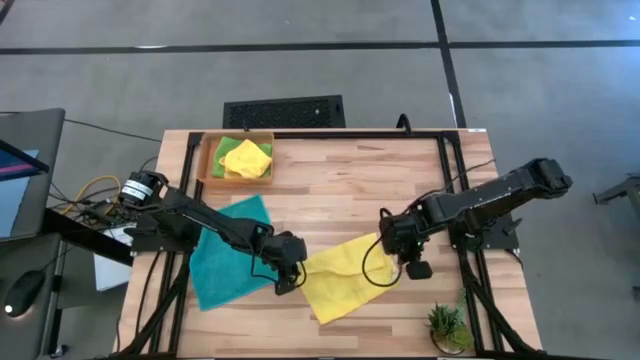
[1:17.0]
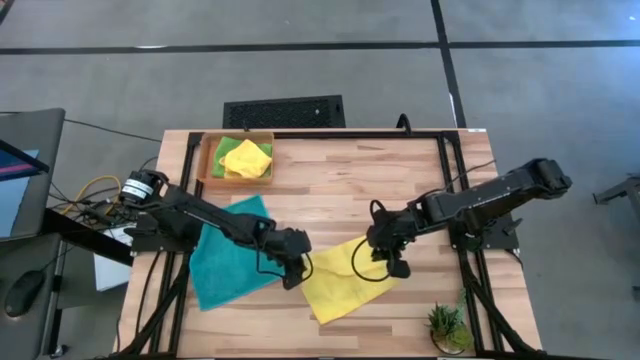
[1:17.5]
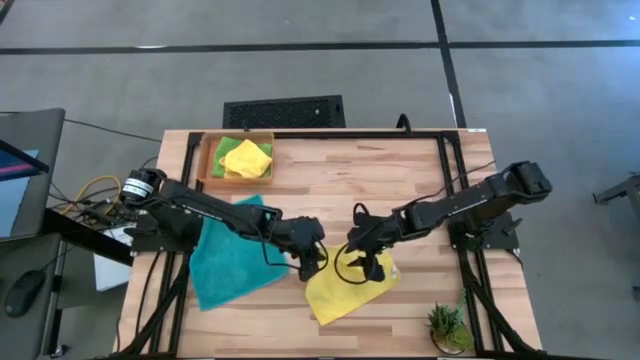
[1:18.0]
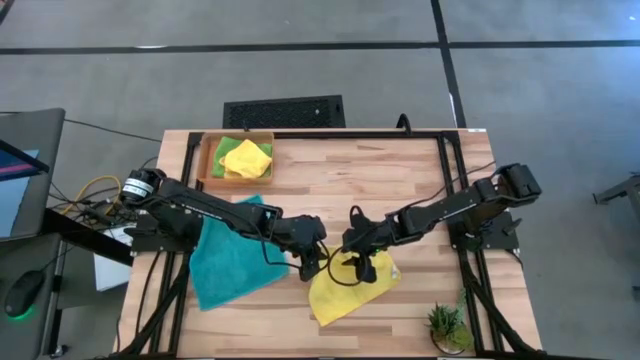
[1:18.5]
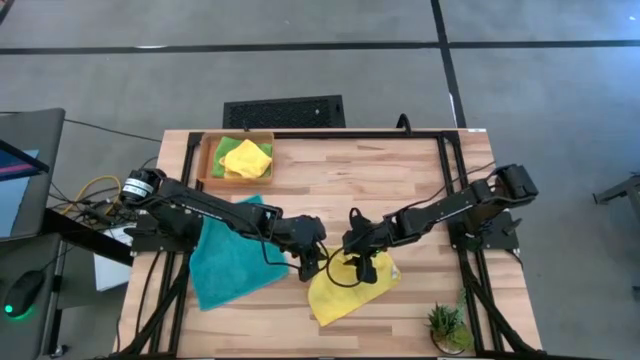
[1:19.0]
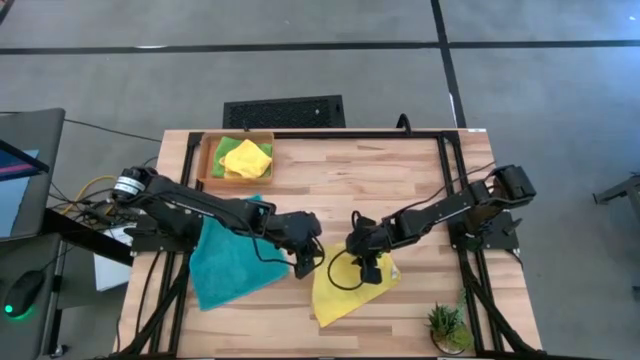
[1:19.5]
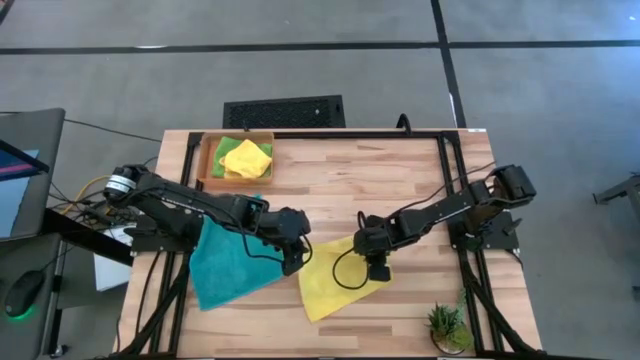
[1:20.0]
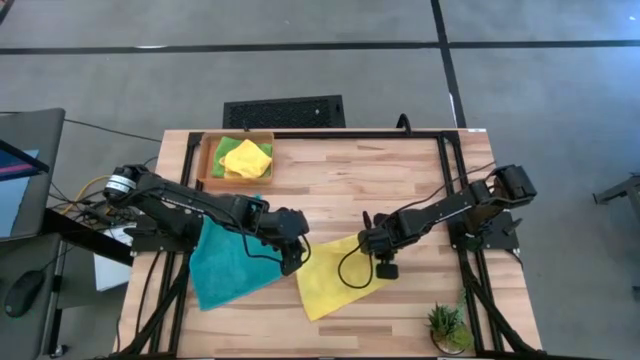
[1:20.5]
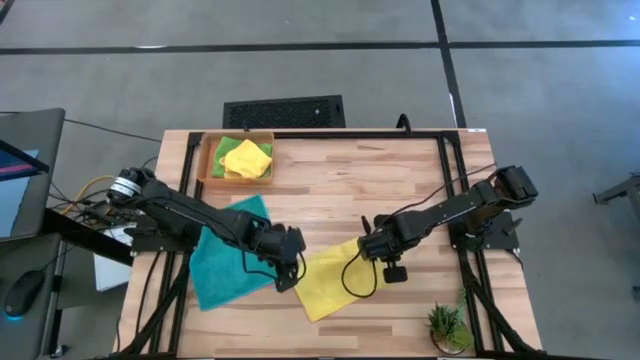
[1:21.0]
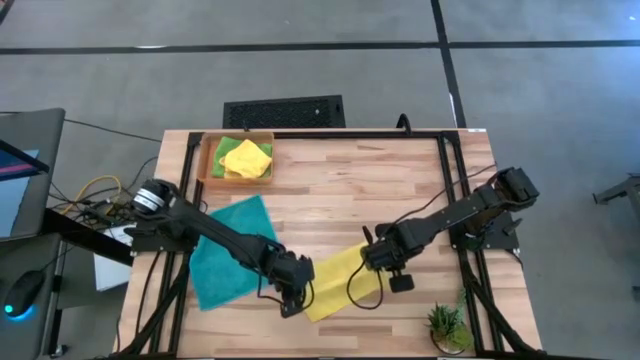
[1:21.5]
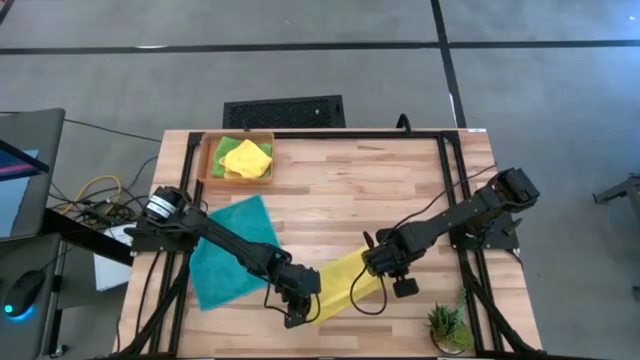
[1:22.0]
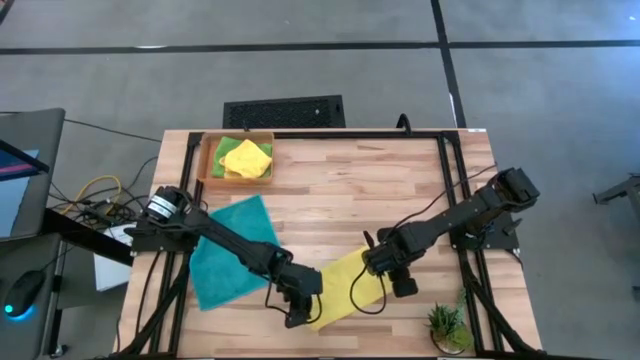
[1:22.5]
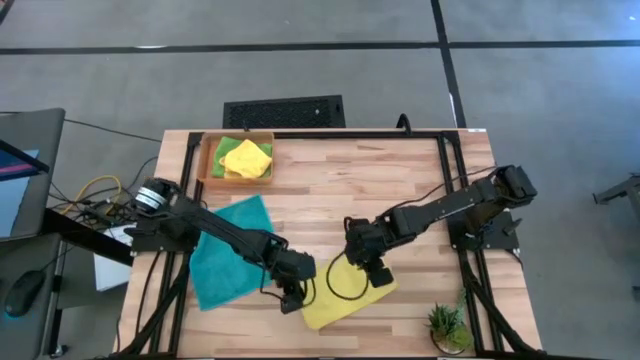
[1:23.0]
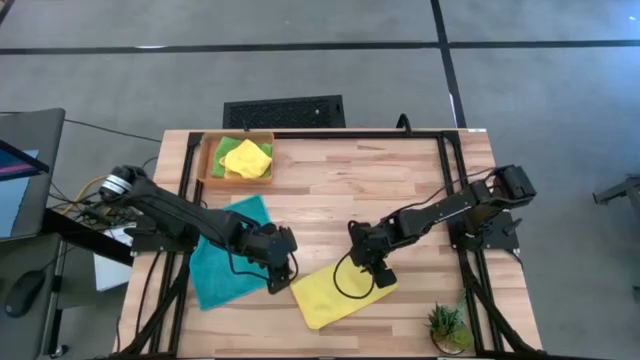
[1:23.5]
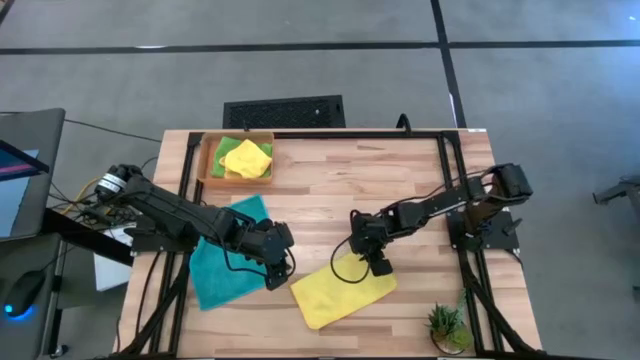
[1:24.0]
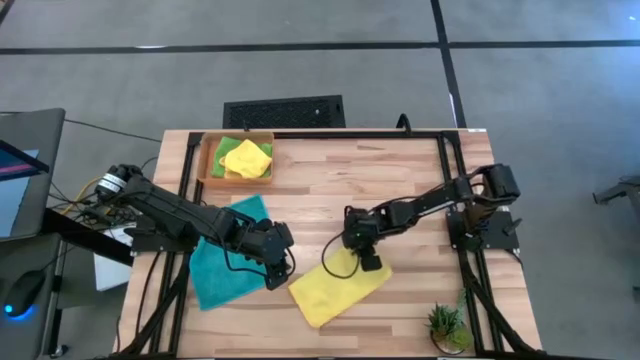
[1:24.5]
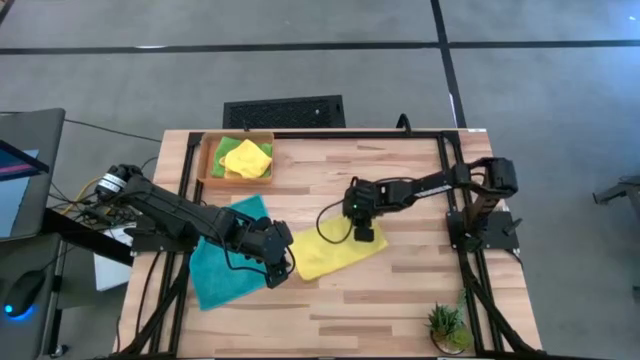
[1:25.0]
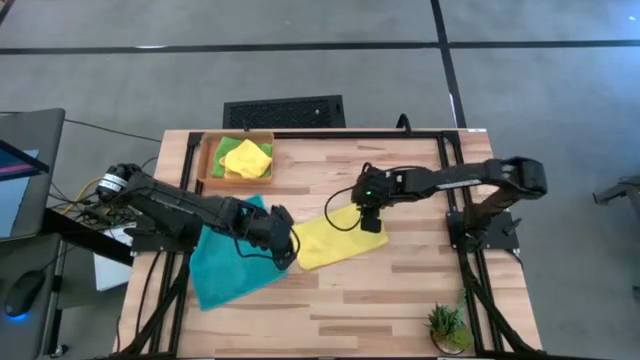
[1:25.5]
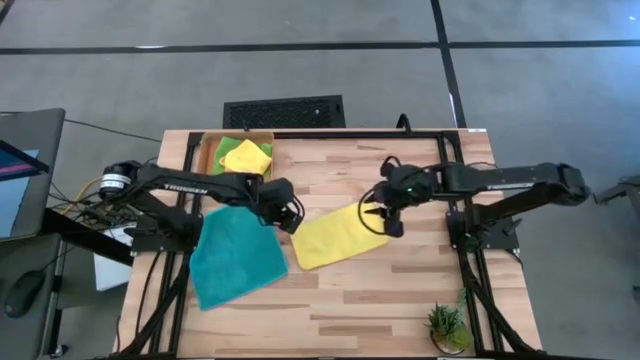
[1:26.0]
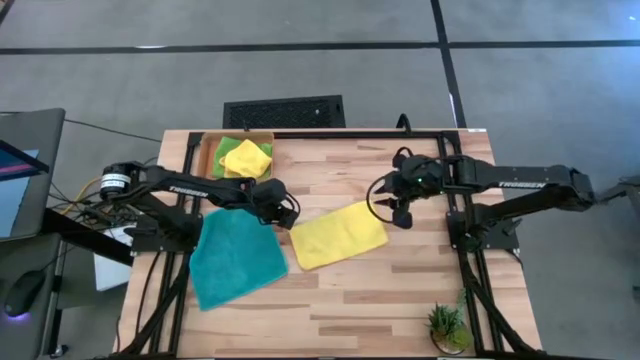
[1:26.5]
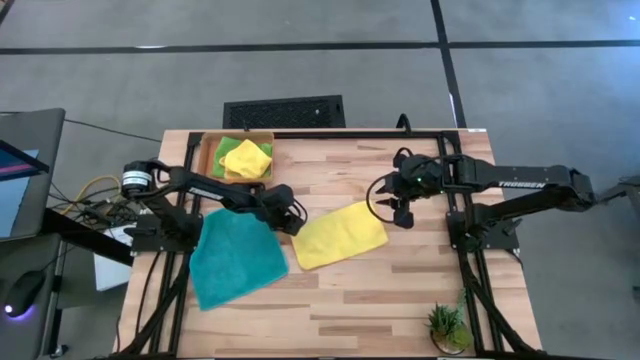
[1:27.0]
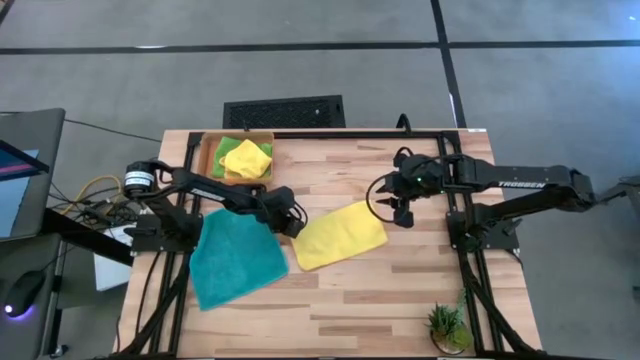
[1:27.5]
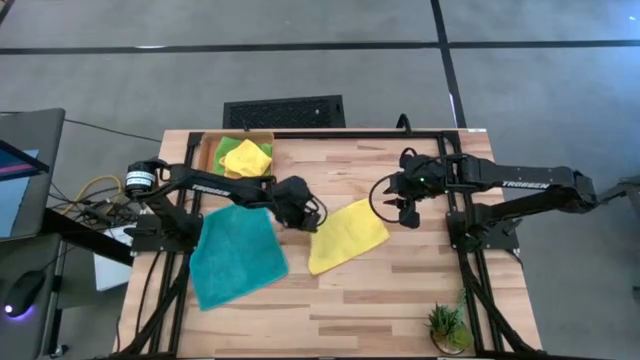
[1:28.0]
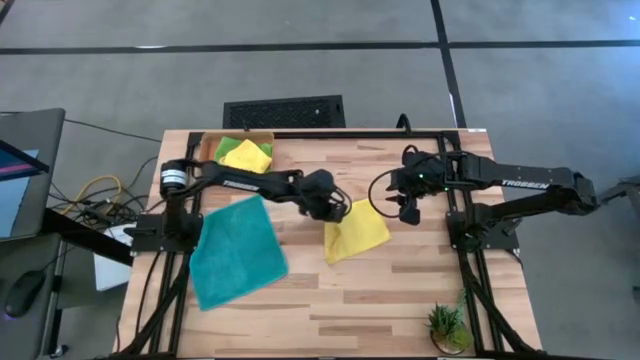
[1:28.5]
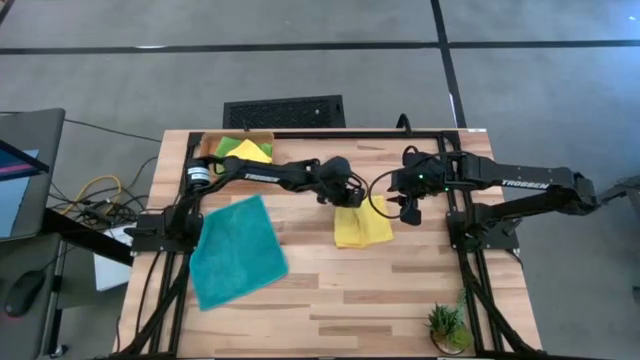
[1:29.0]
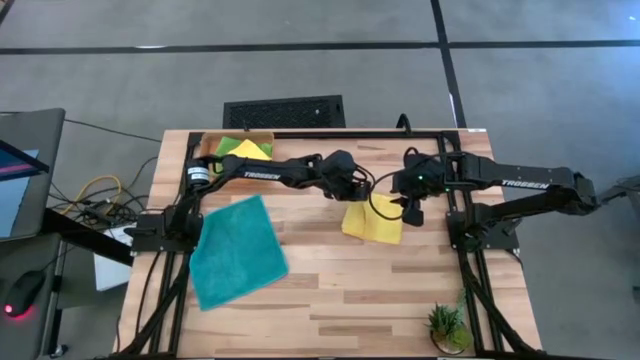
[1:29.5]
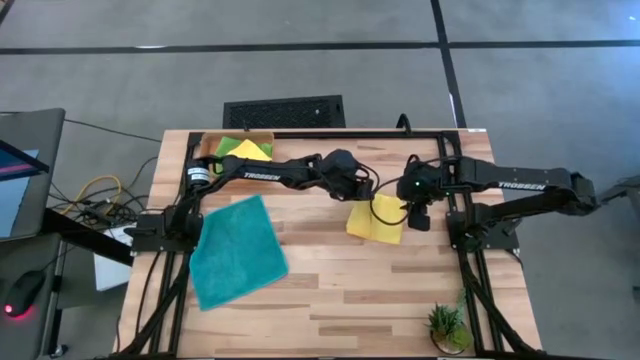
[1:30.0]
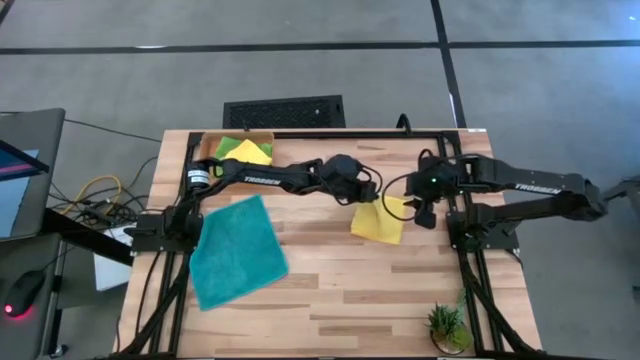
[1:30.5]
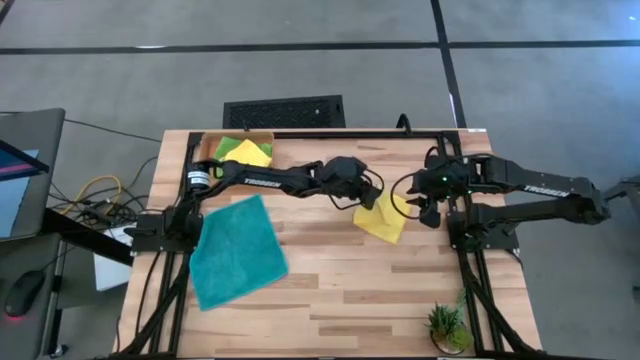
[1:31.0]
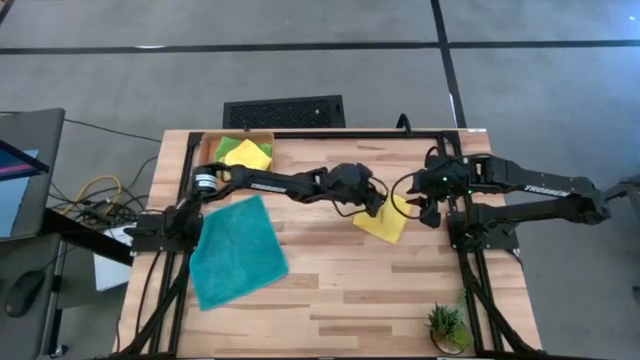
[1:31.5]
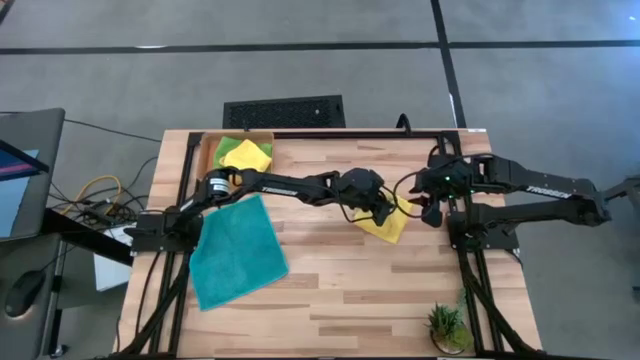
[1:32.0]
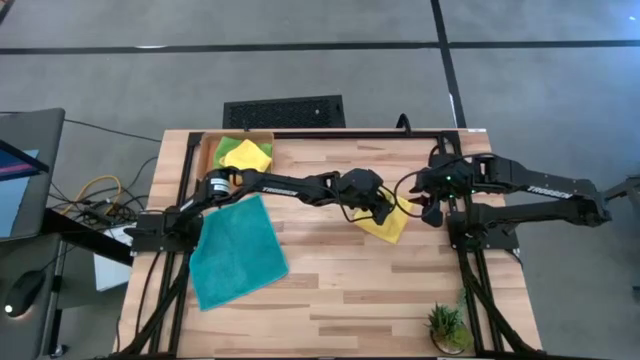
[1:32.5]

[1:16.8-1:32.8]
Task: Fold microfiber towels
Fold the yellow microfiber towel

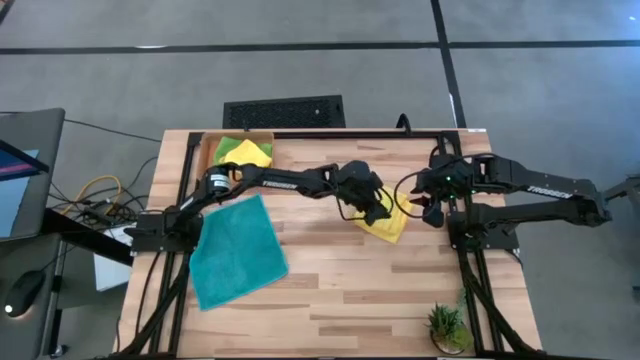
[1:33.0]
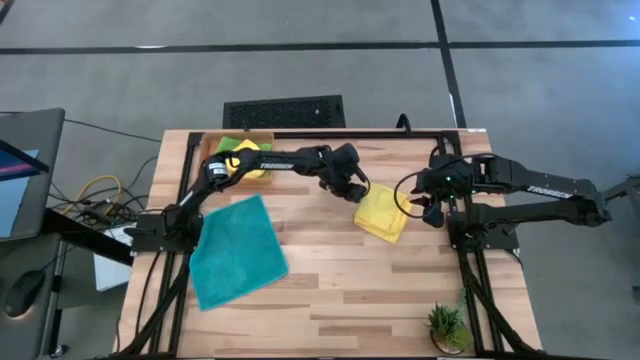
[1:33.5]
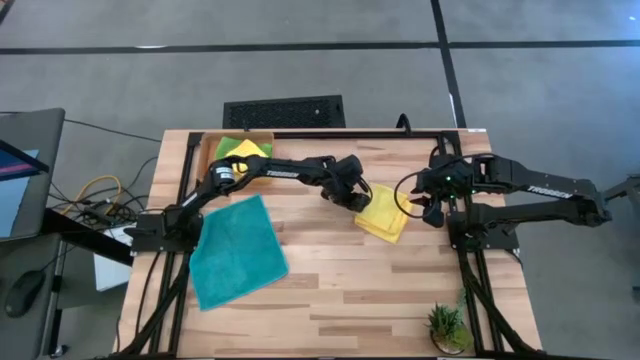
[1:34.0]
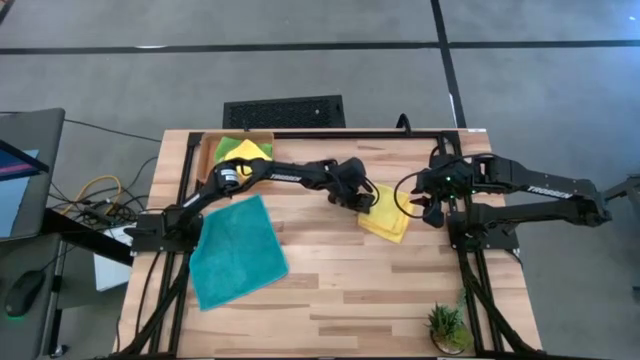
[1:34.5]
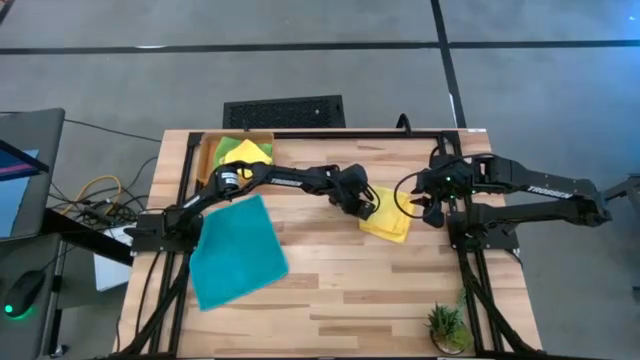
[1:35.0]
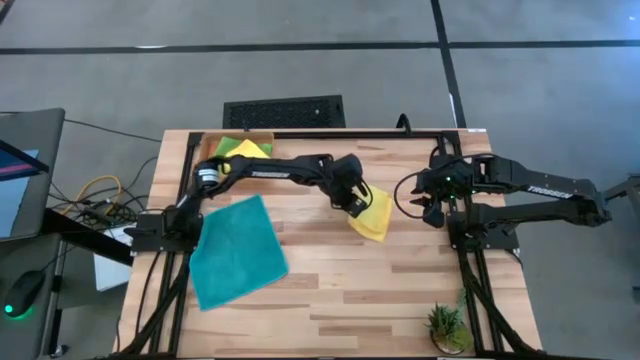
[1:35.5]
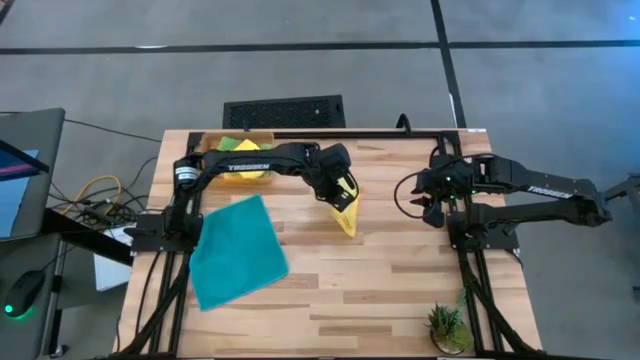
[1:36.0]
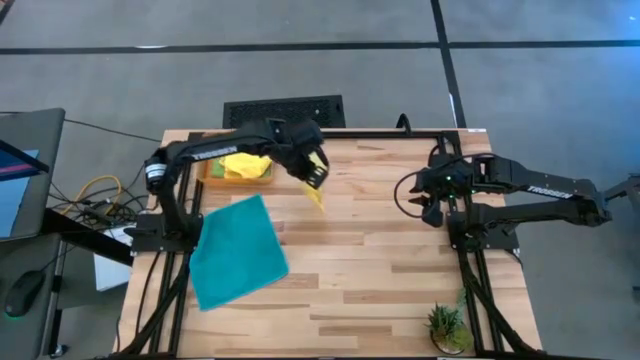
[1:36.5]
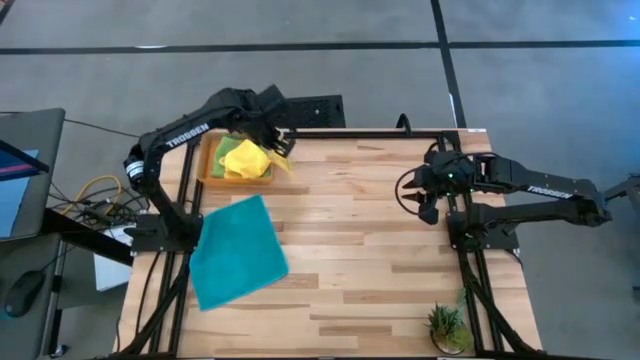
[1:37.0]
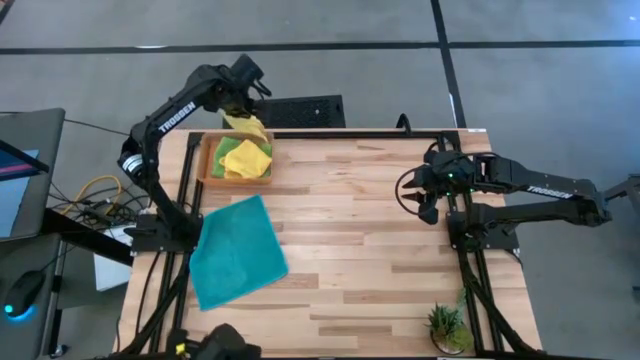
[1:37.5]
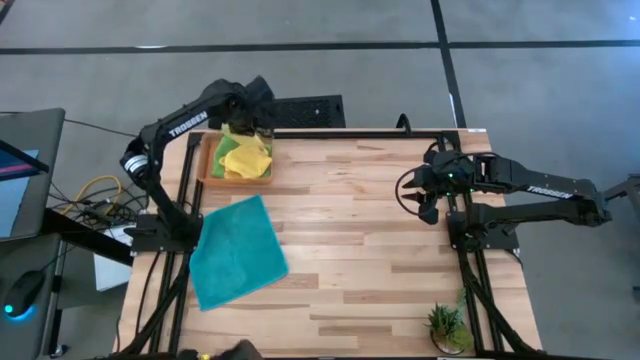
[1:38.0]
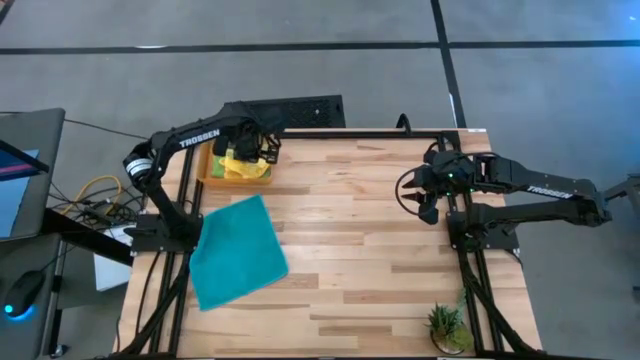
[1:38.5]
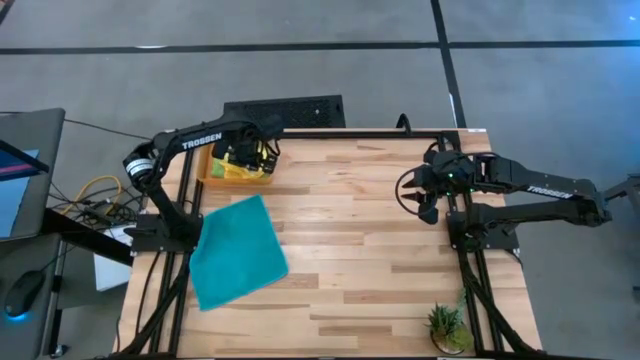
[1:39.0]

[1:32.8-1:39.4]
Stack the yellow microfiber towel on top of the yellow microfiber towel
